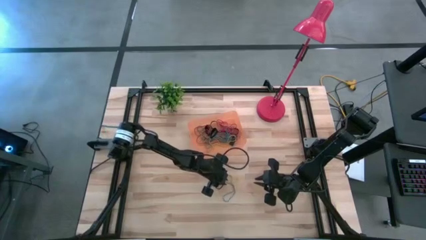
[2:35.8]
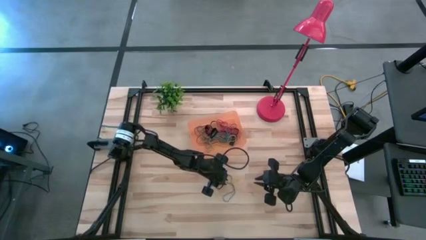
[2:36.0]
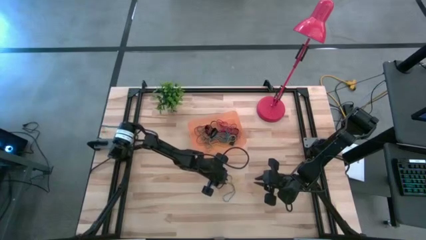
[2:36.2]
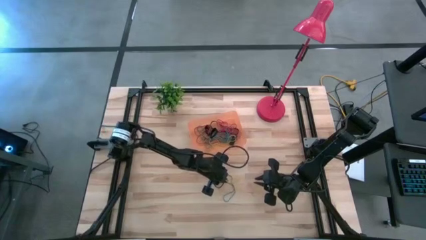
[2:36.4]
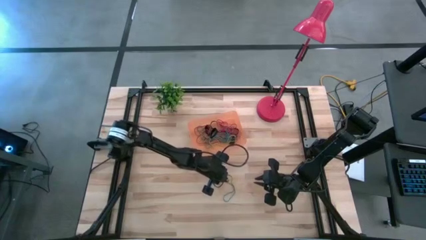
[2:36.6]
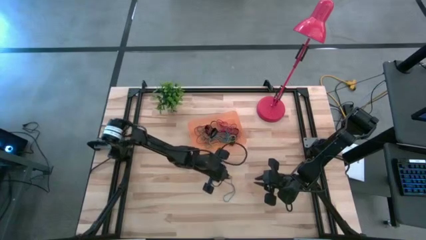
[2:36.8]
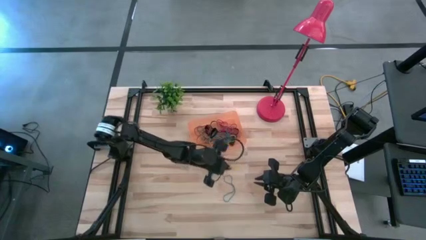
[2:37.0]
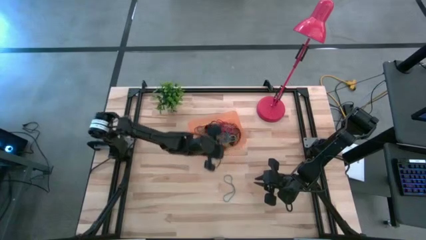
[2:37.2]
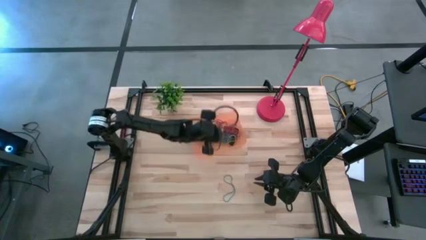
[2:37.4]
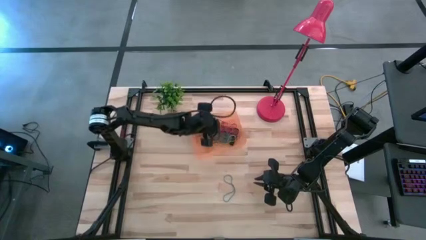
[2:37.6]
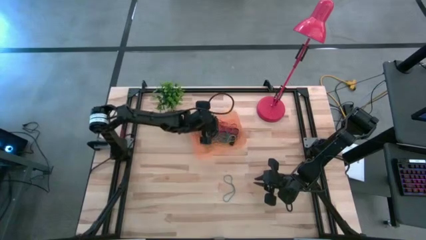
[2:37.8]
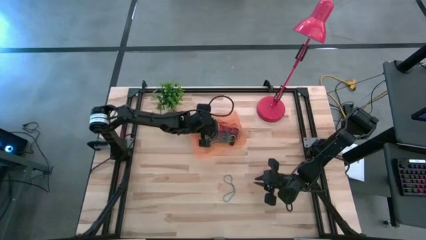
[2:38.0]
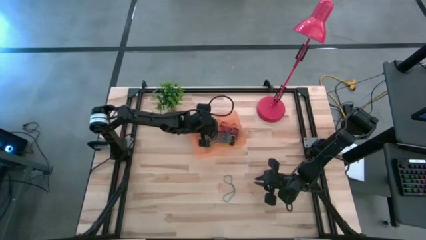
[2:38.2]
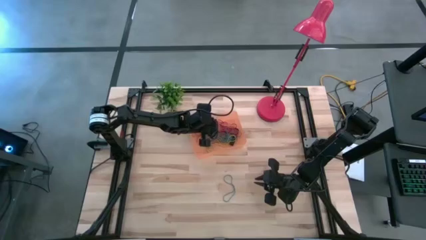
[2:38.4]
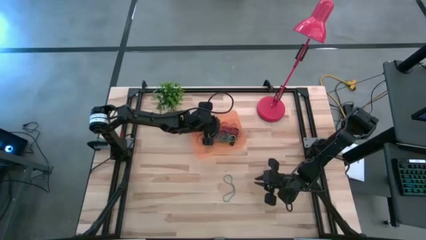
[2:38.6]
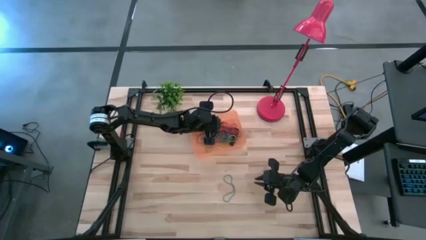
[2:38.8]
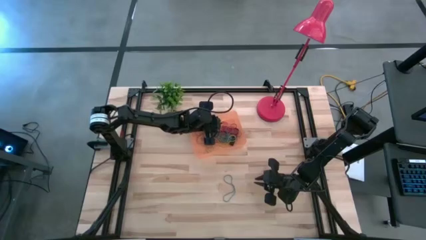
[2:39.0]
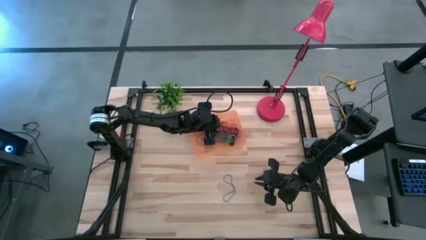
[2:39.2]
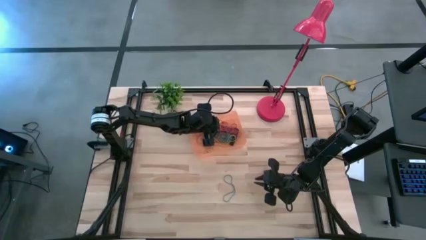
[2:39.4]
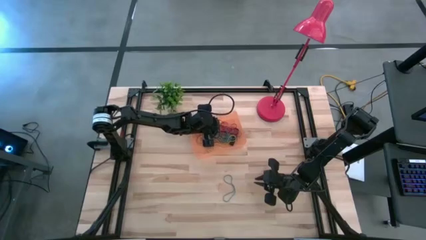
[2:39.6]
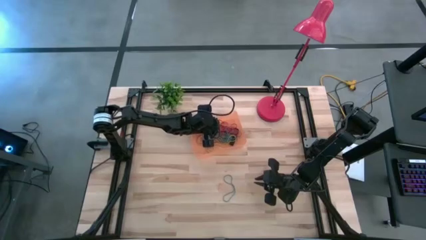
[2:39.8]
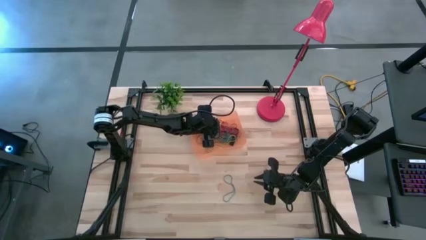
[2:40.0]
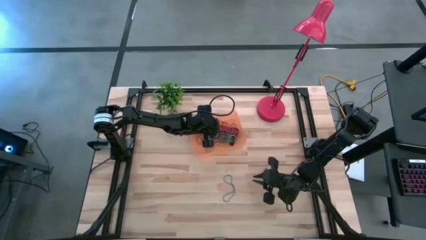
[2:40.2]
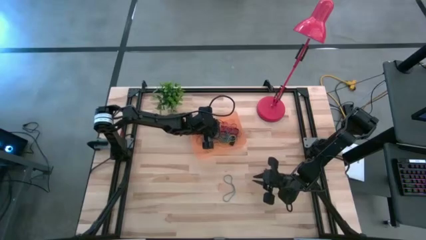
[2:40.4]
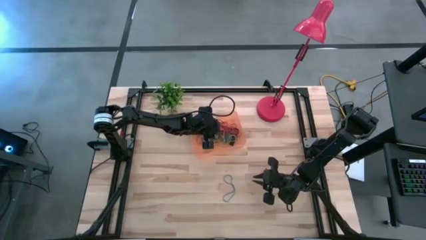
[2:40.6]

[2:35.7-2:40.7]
Task: Pick and place rubber bands into bin
Put the yellow rubber band into the orange bin

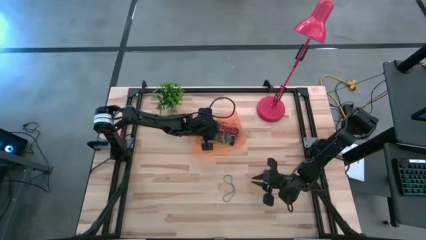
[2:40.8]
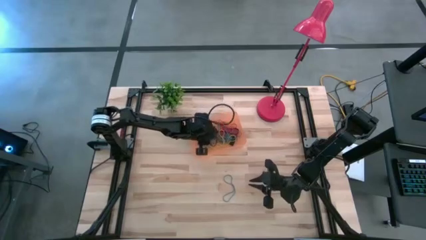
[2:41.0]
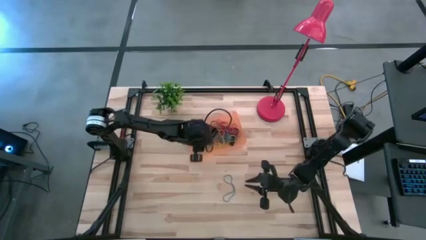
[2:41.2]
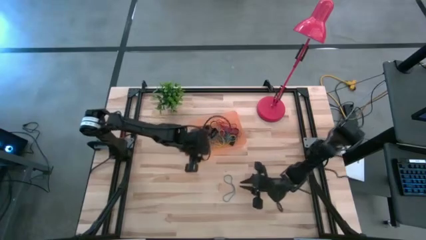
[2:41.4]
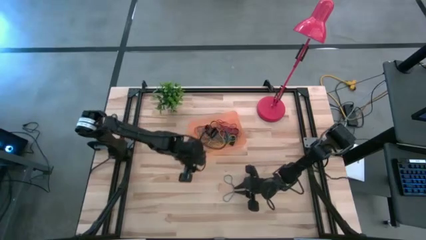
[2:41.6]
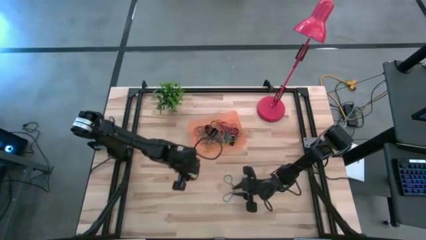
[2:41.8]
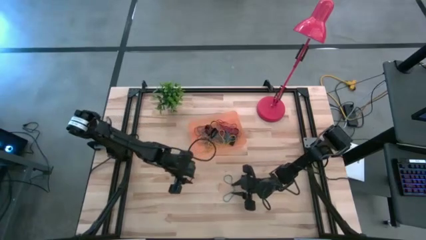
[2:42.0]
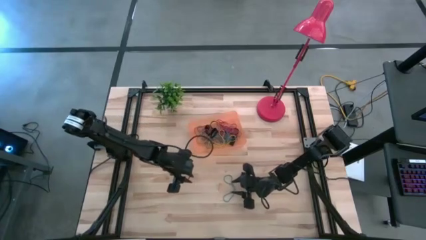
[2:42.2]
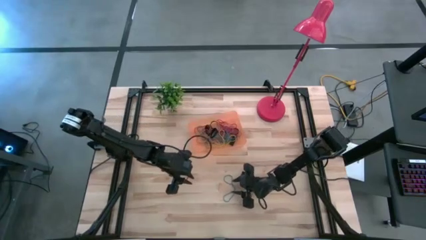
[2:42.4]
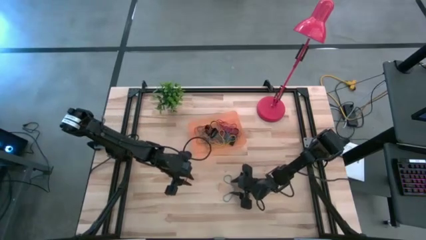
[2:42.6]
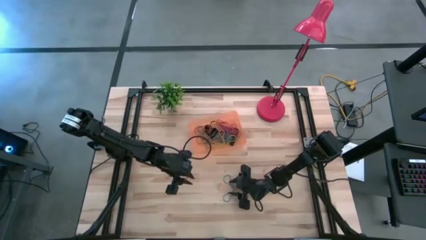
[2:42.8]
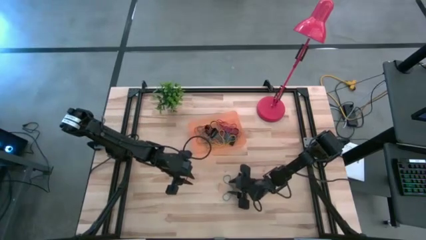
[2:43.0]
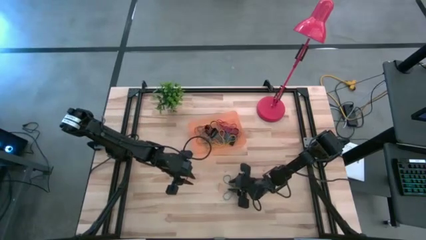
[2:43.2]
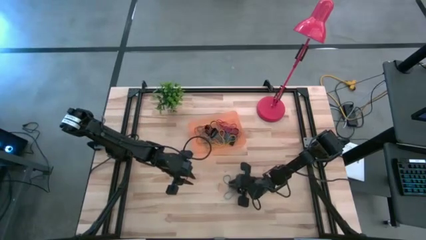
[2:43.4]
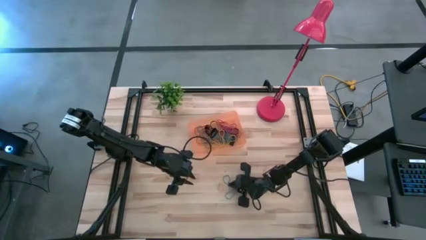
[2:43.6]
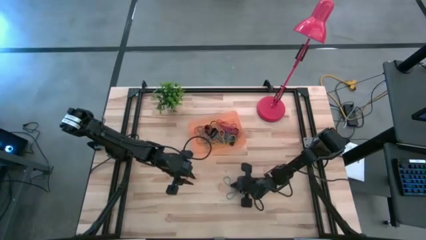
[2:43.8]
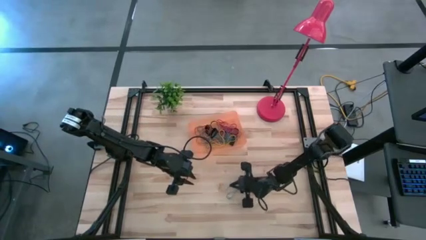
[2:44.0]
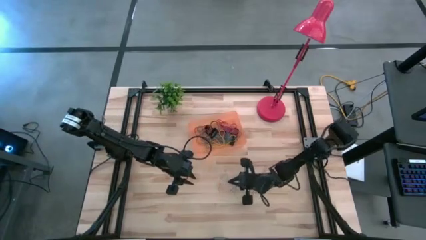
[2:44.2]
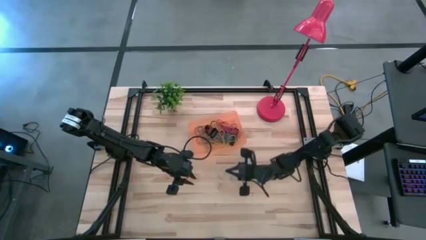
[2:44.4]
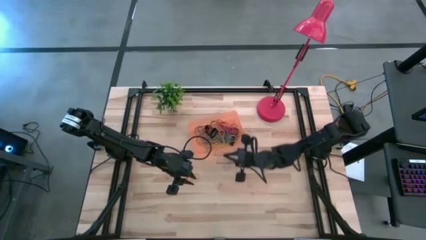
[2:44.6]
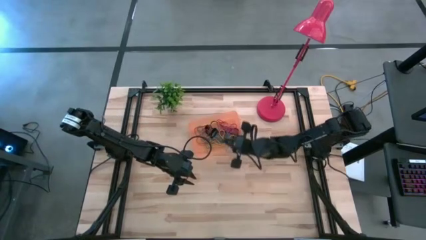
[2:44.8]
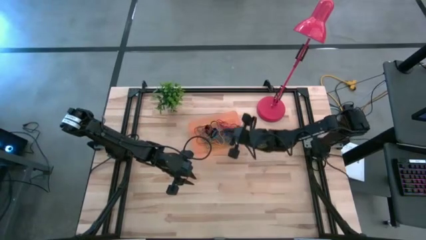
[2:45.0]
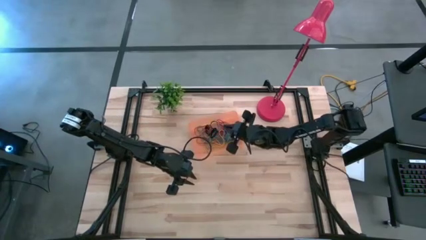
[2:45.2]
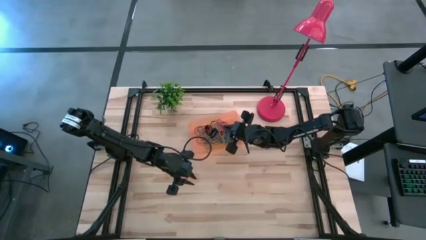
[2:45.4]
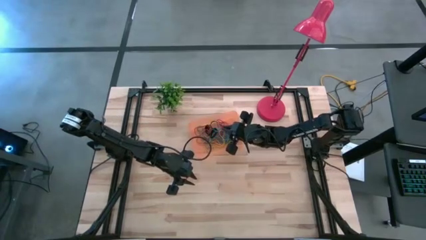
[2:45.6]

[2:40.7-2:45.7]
Put the blue rubber band into the orange bin

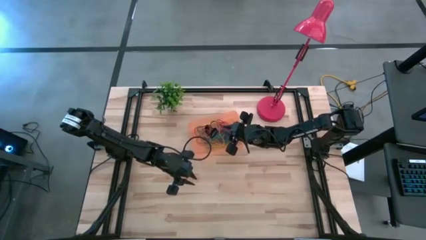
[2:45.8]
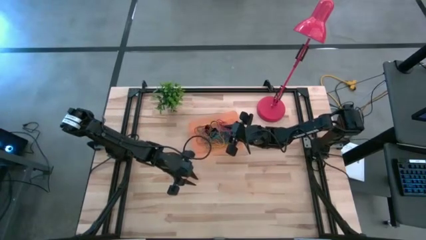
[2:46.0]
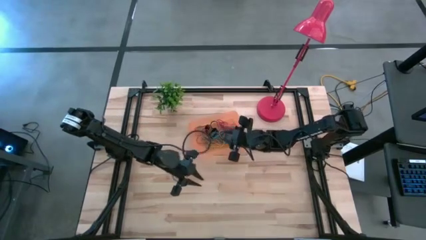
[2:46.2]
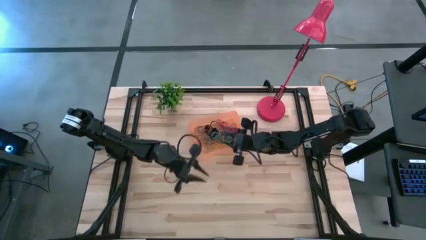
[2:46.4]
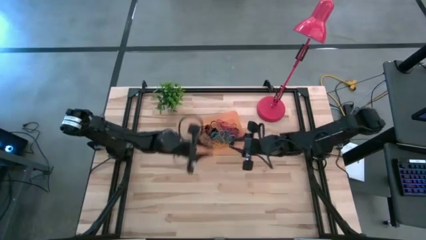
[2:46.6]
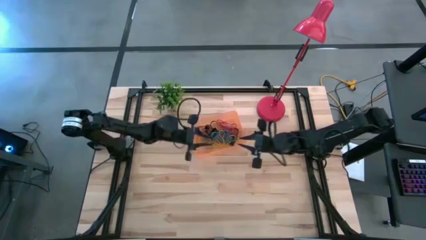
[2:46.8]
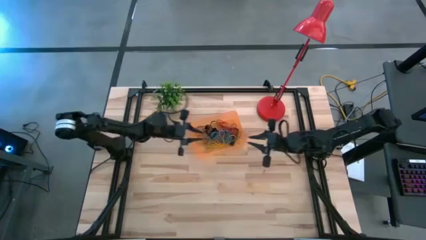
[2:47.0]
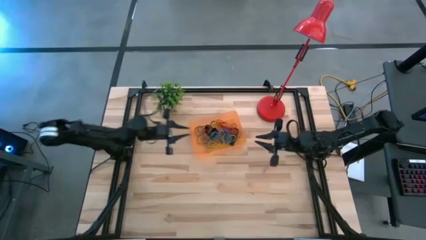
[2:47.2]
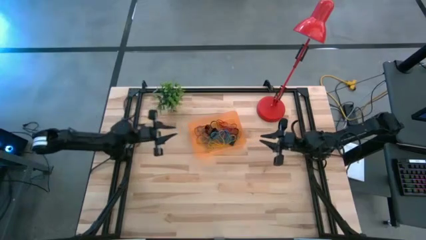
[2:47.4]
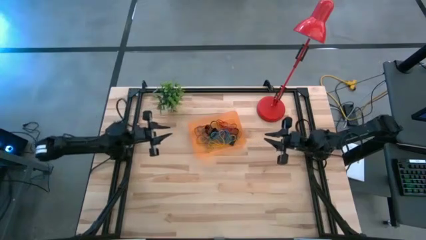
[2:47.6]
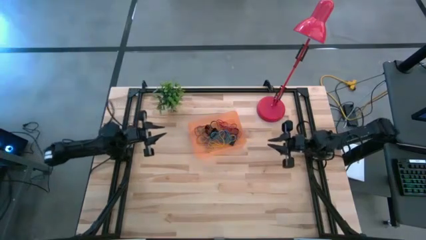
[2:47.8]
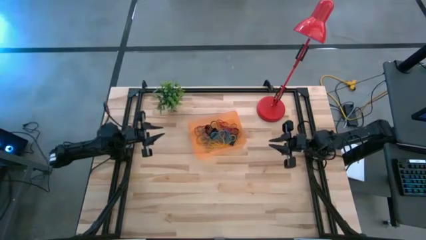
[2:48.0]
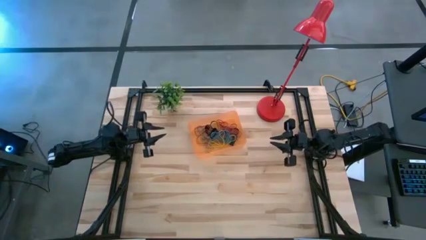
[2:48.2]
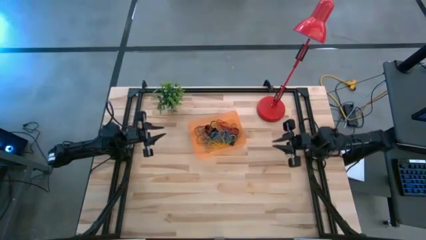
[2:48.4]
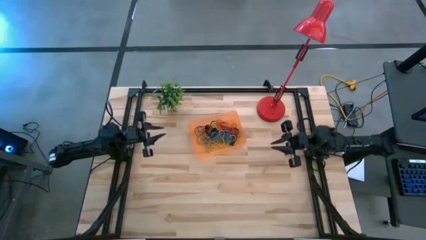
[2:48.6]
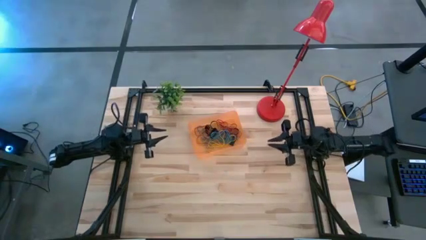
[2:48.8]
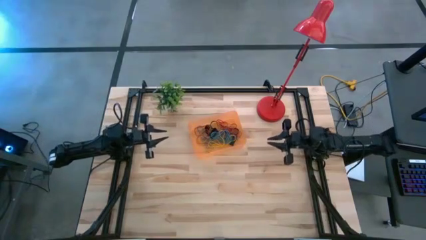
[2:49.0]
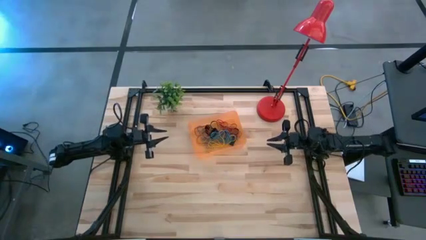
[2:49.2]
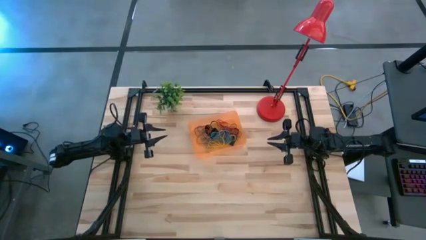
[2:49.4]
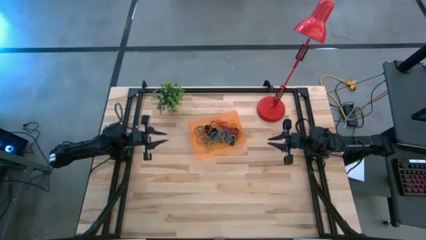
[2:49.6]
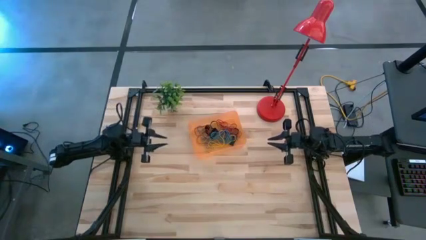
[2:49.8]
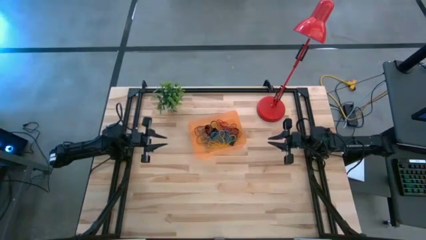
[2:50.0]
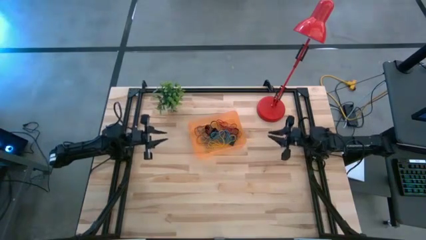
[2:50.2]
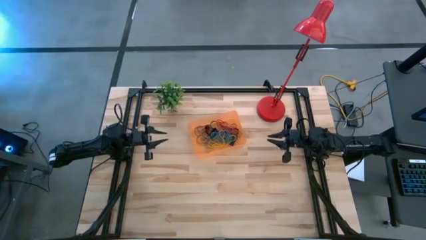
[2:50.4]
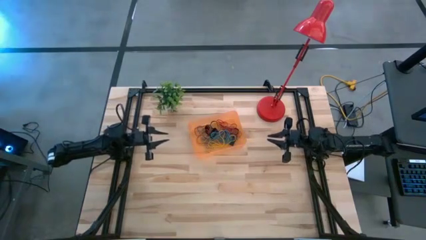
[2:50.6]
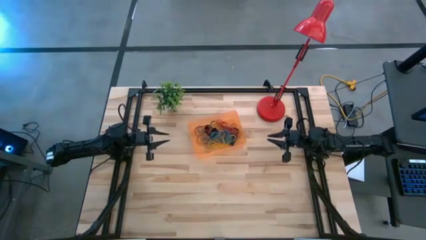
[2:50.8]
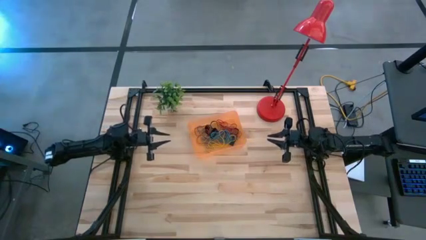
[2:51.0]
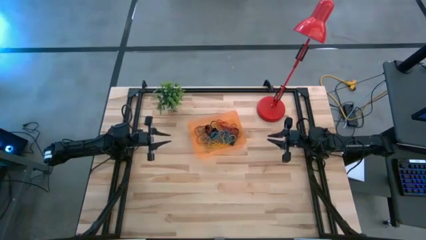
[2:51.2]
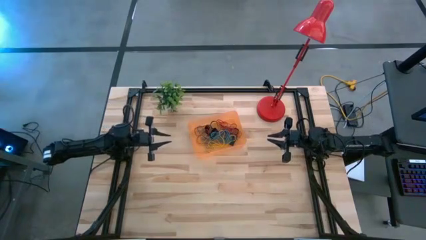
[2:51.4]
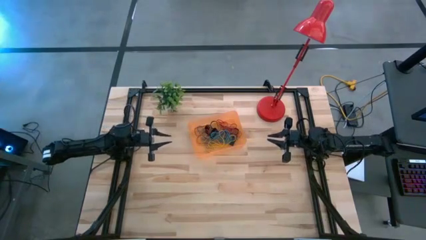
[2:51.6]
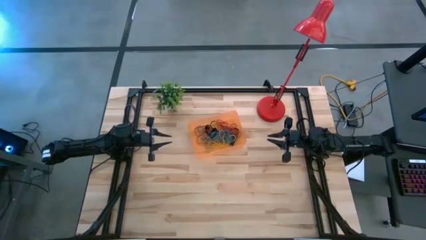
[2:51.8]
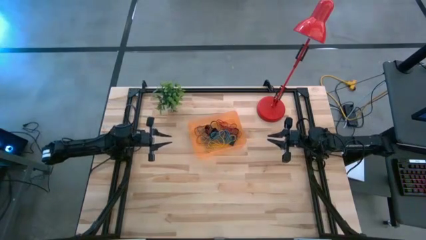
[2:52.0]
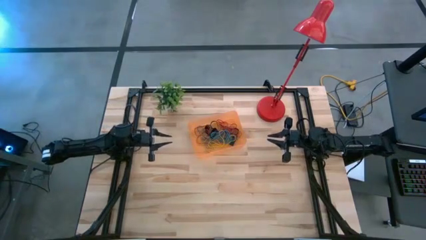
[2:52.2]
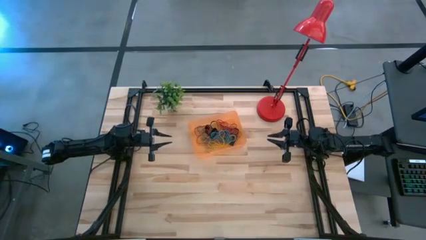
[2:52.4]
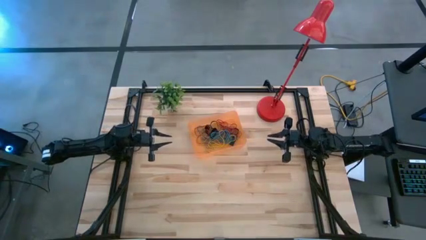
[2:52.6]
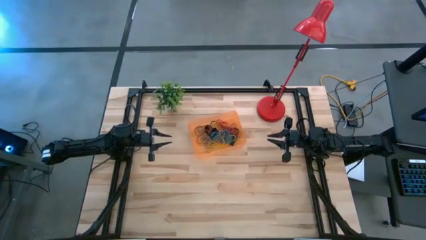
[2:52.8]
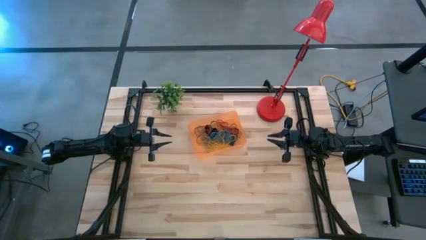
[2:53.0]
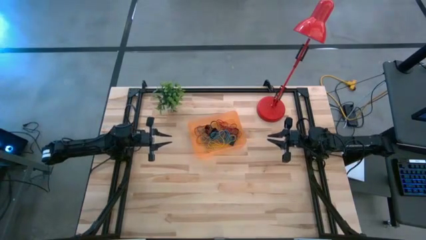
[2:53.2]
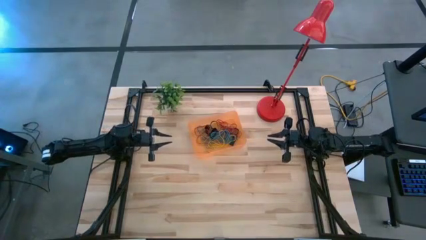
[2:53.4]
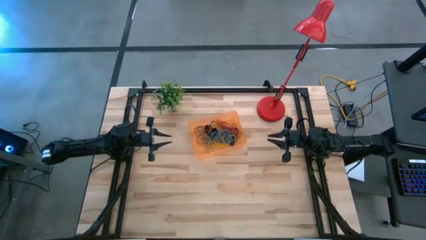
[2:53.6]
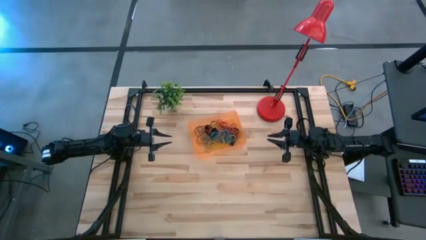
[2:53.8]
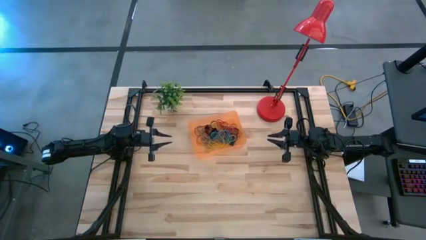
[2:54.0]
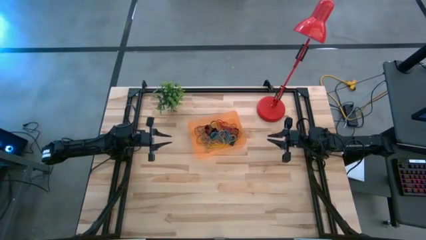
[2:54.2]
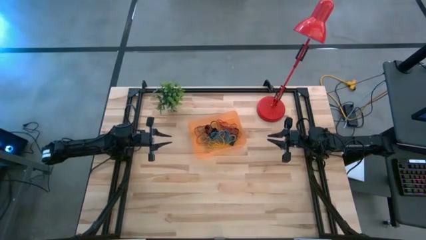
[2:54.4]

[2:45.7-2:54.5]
Return to Home Position
